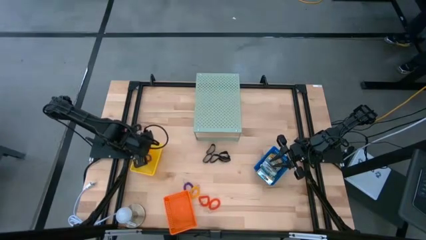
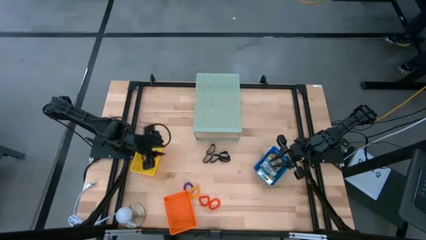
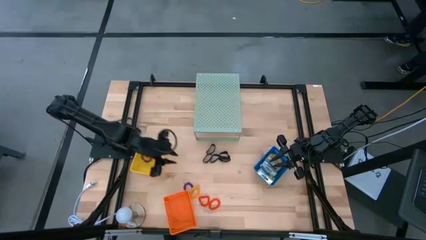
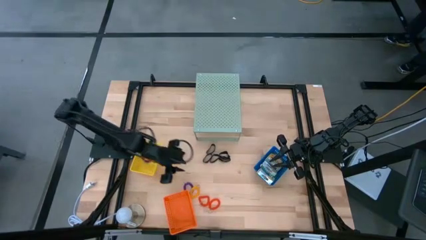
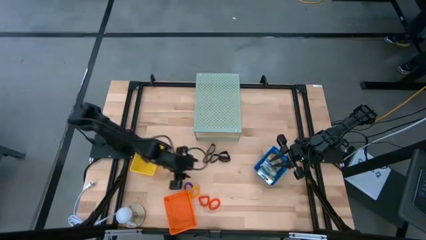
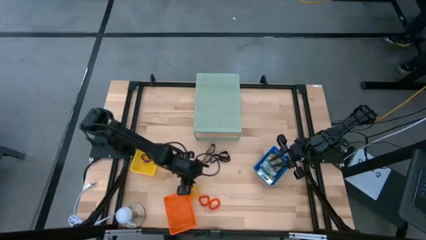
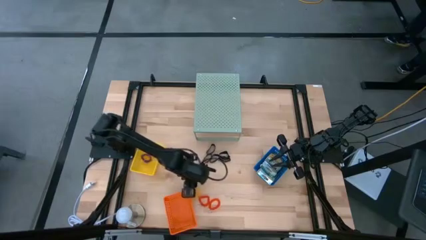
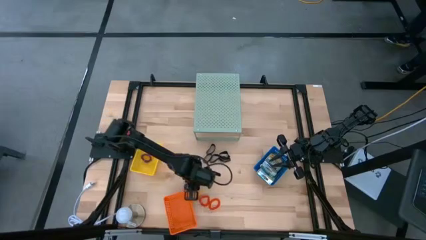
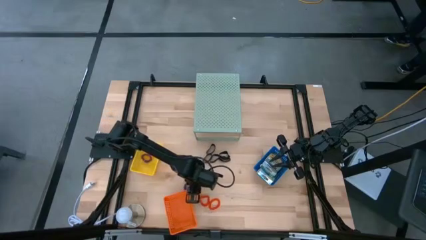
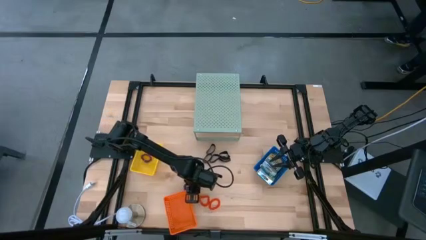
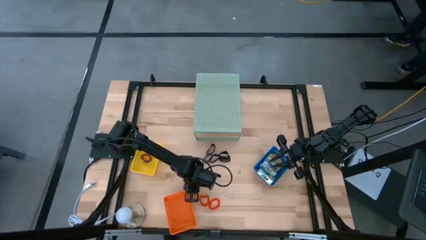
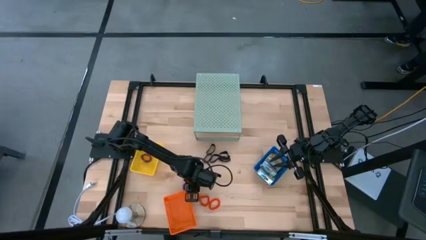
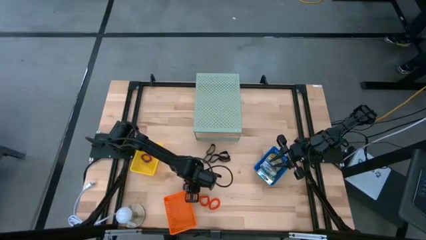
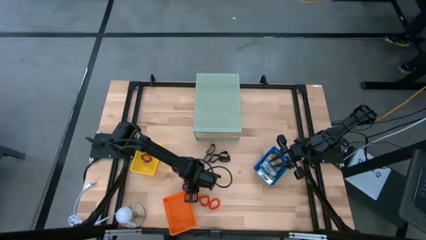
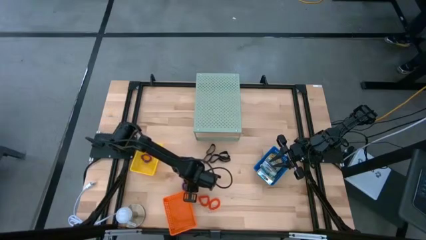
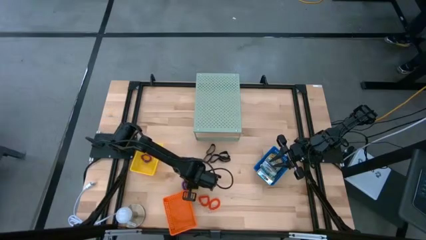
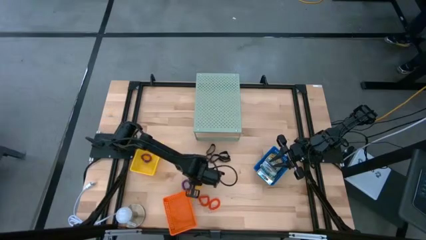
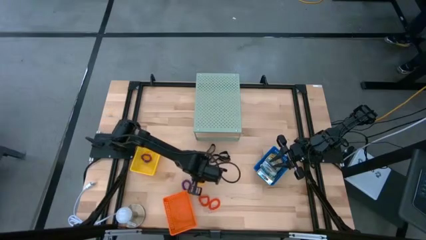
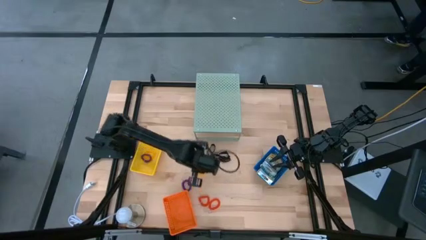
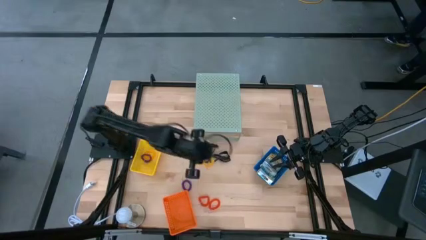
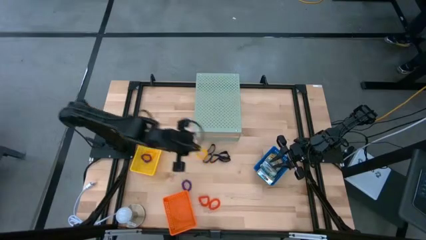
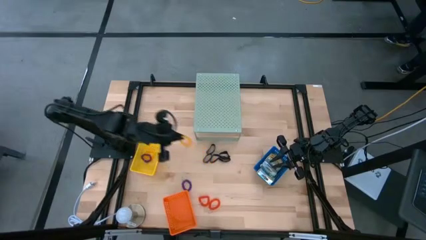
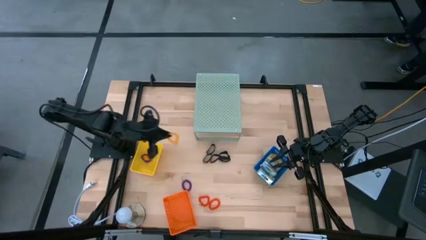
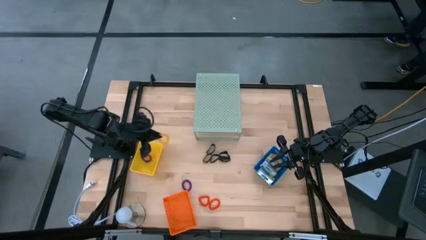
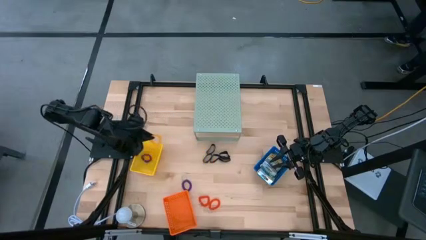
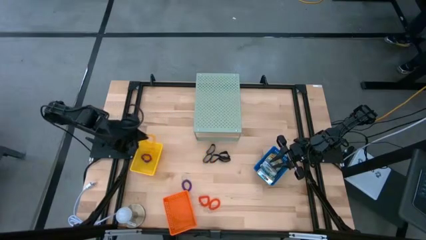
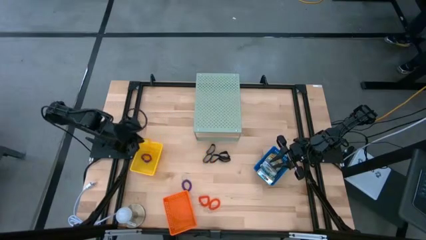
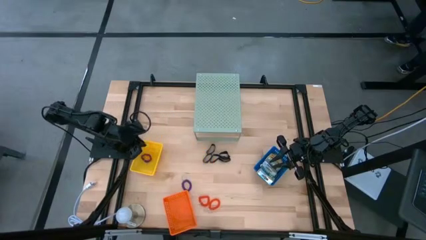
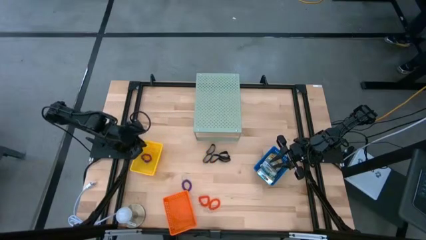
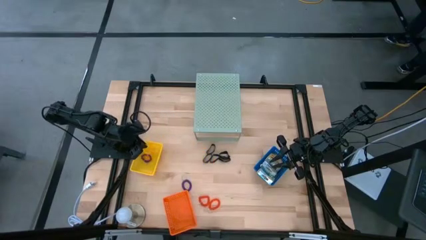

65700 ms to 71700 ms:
Task: Pick & Place Office Desk Supplies
Put the yellow spring keychain into the yellow bin

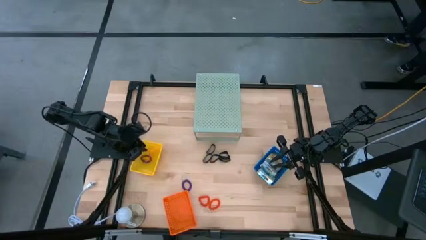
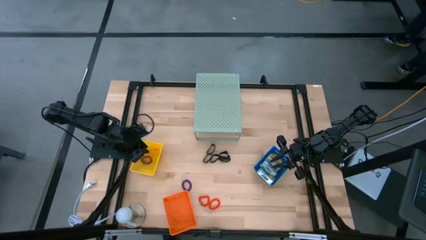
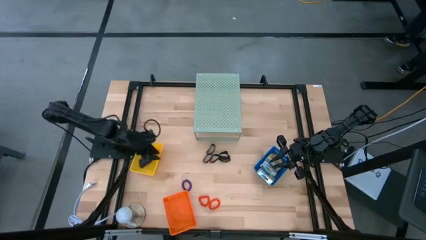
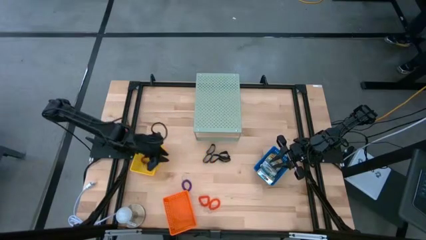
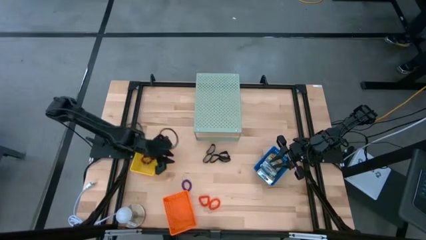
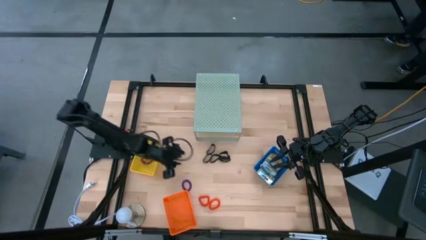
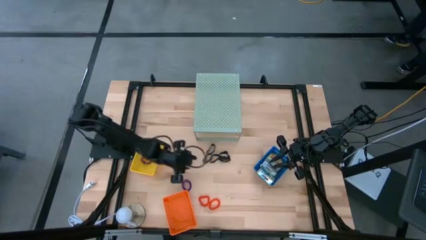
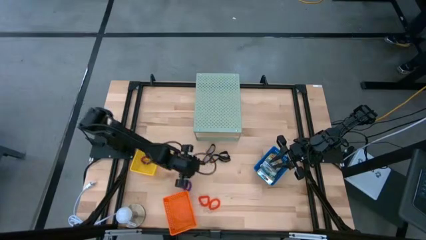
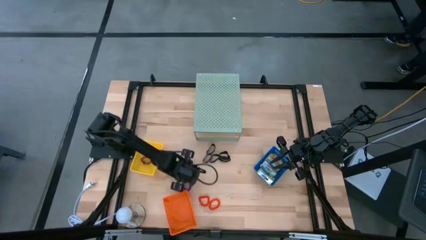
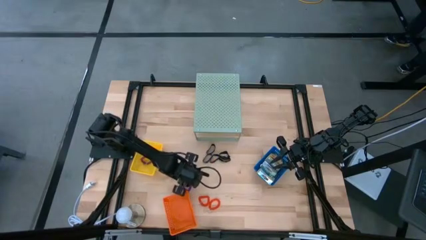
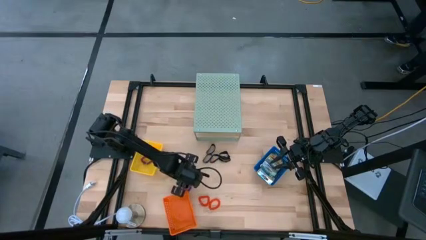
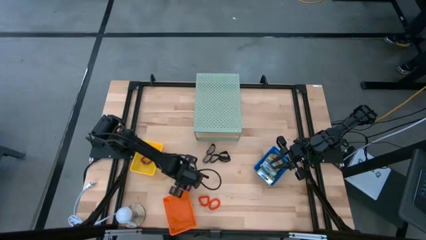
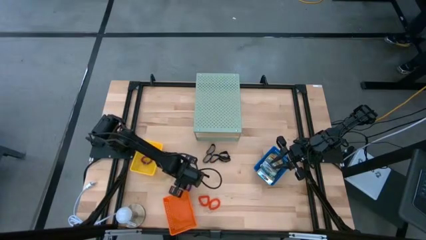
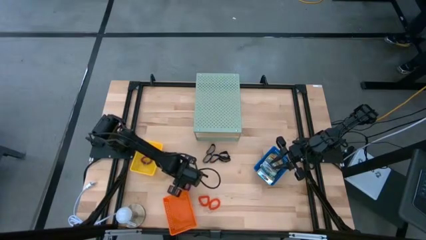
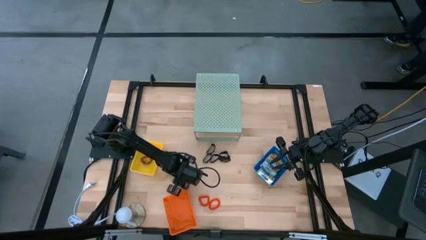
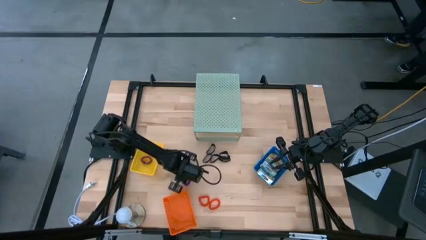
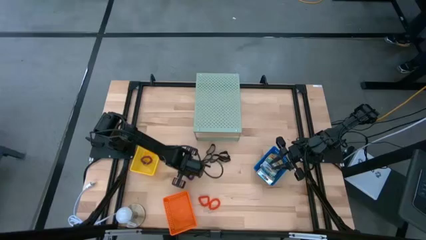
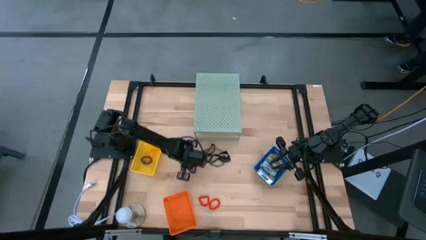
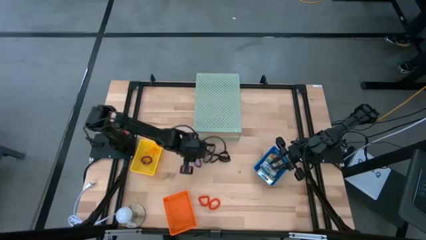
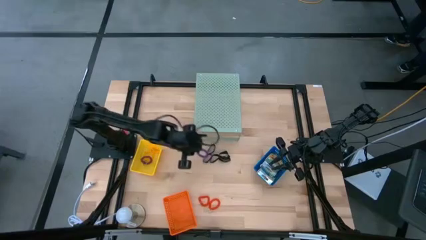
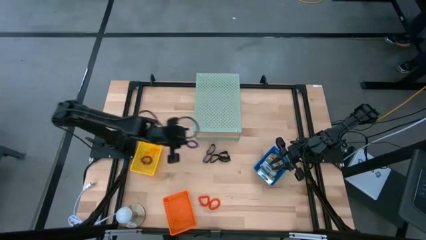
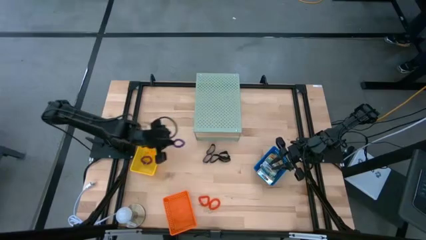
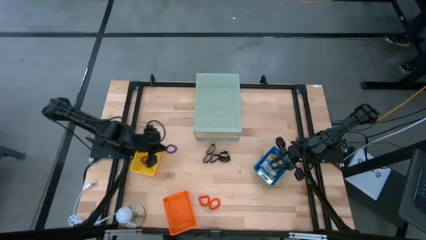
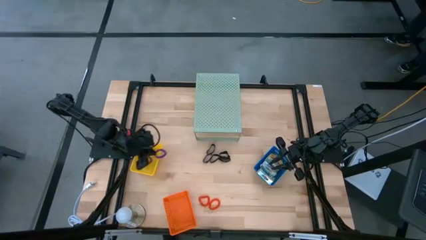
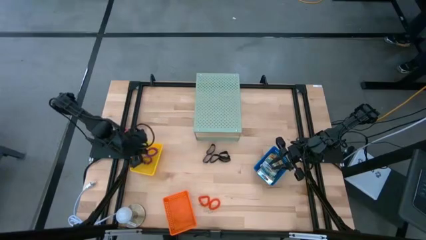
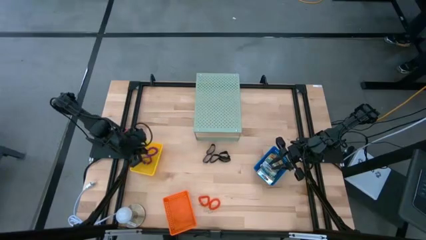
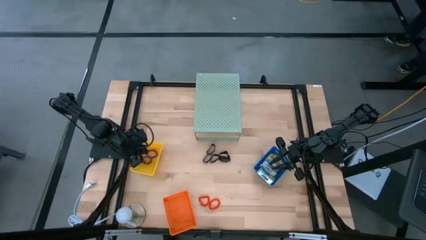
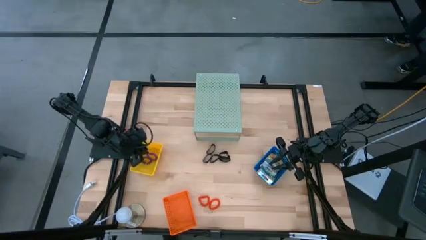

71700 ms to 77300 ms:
Put the violet spring keychain into the yellow bin

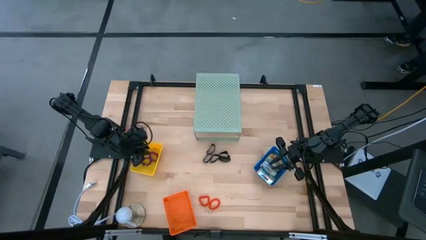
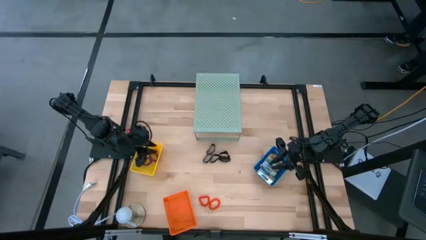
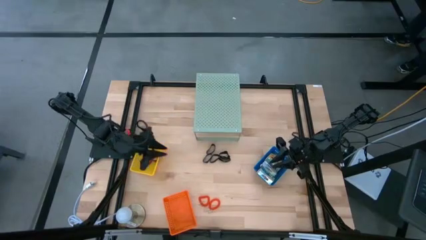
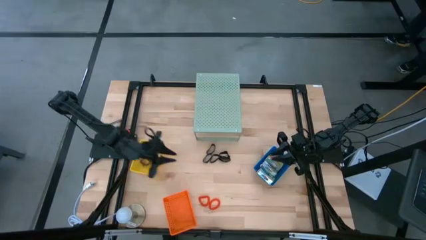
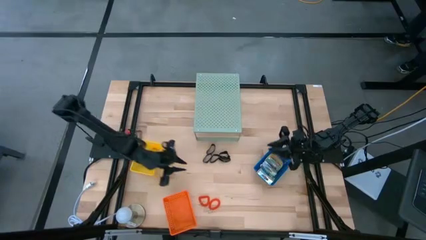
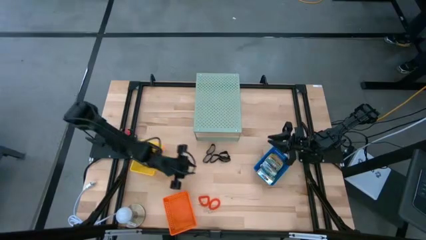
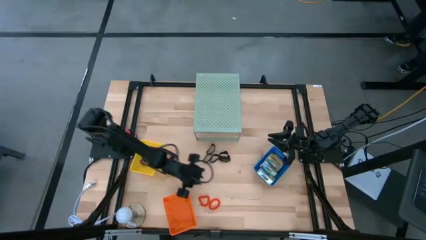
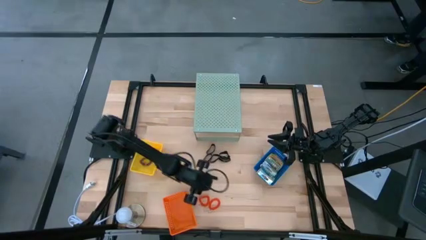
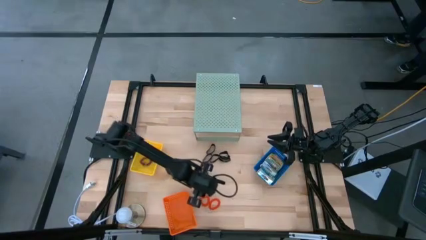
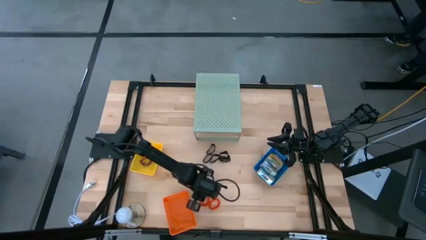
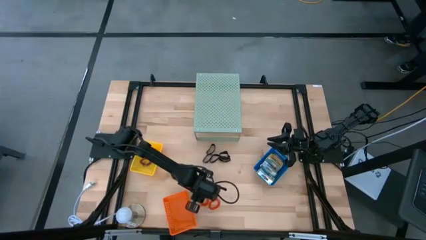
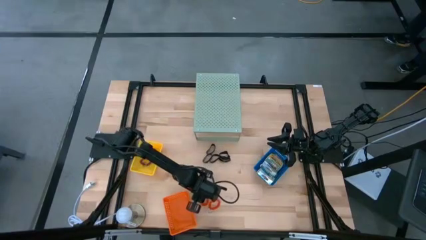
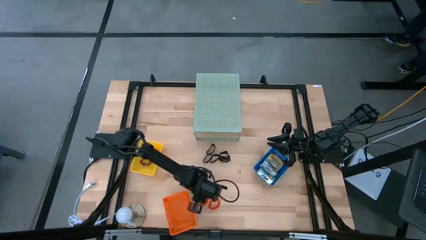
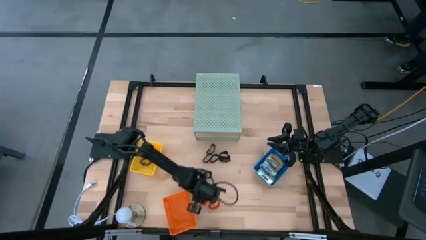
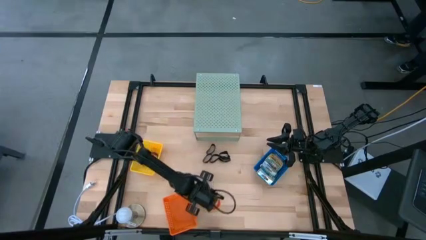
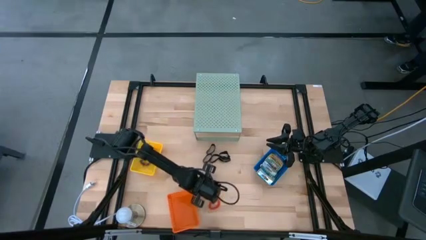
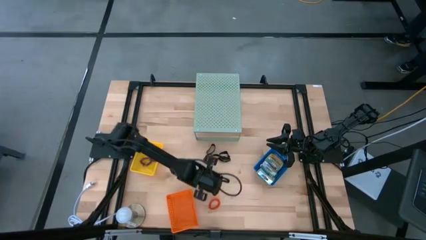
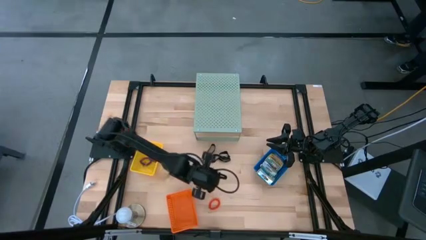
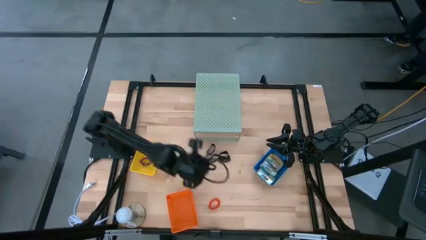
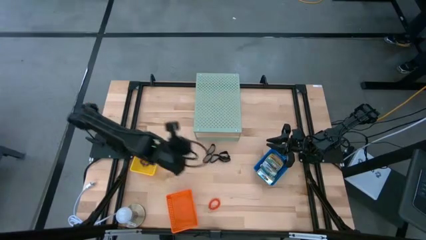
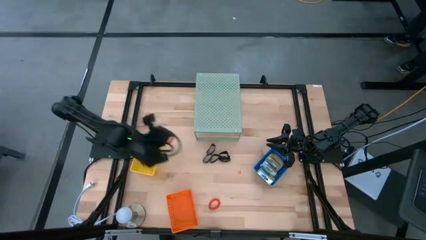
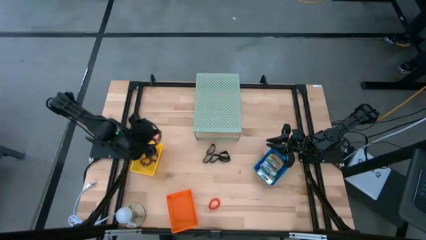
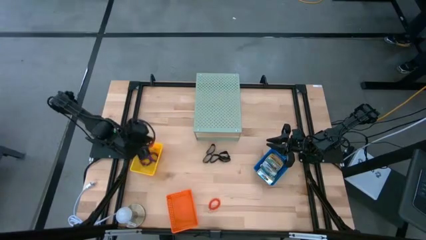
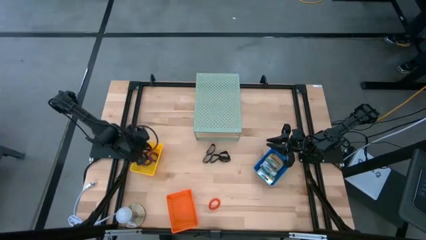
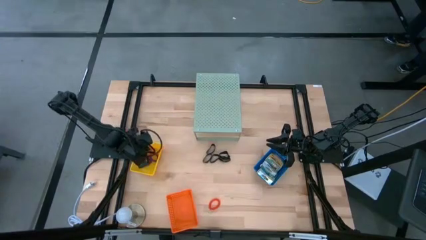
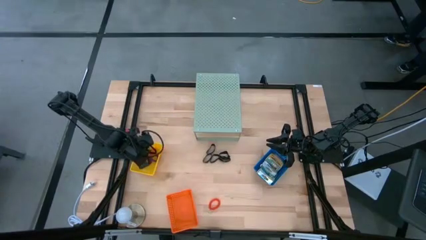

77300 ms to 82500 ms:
Put the orange spring keychain into the yellow bin
